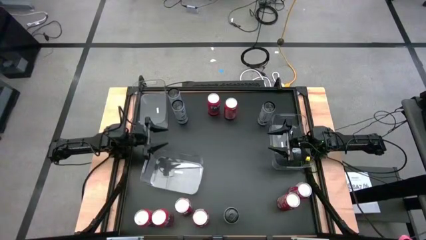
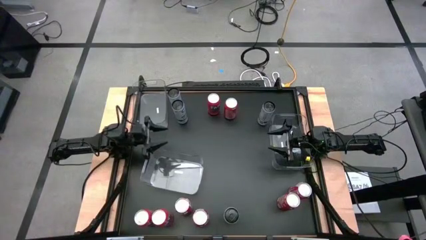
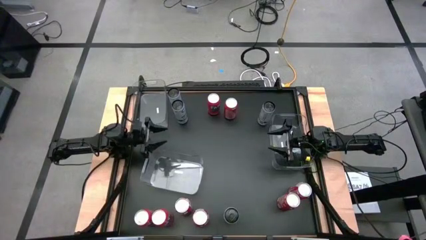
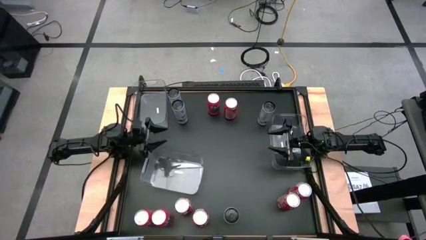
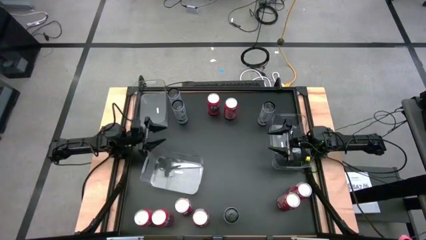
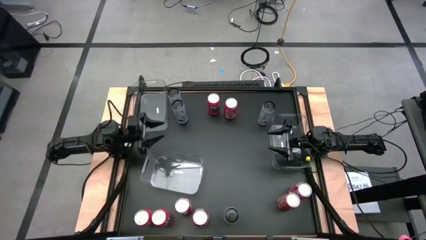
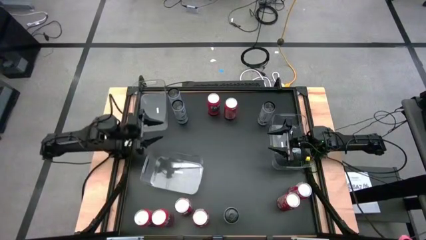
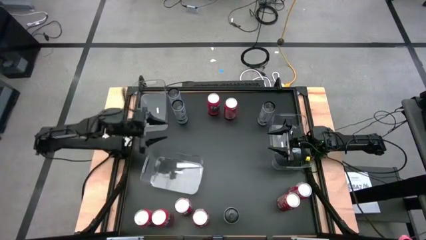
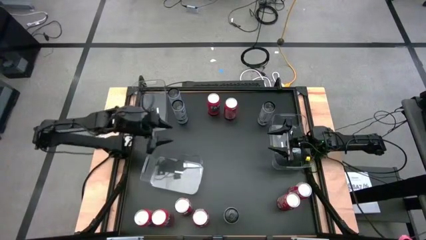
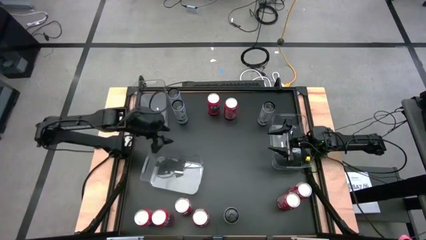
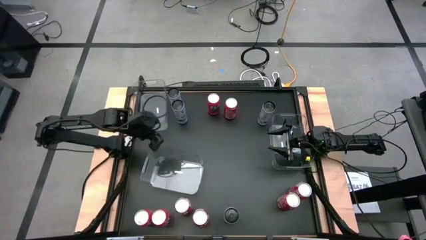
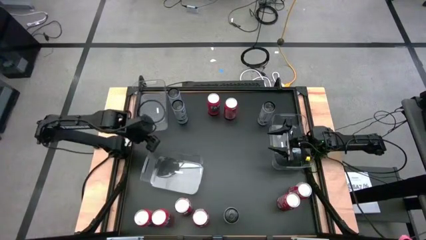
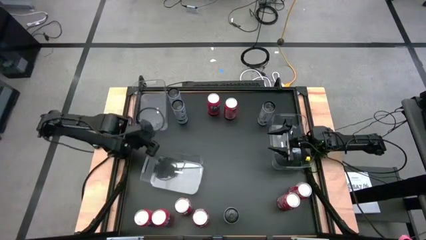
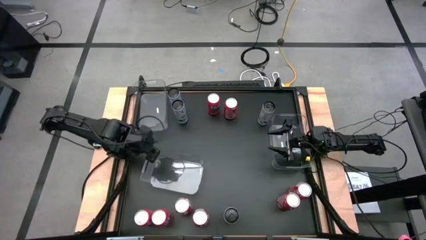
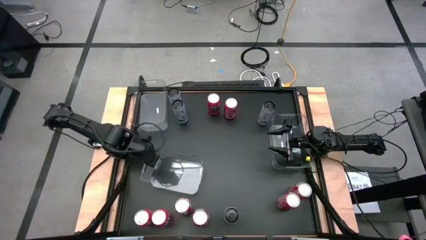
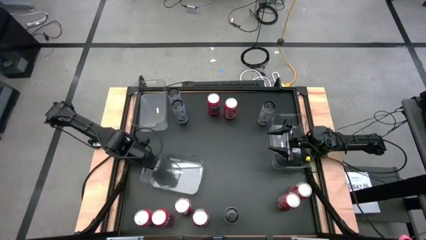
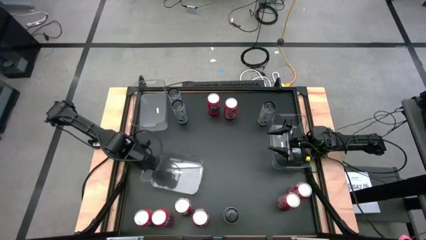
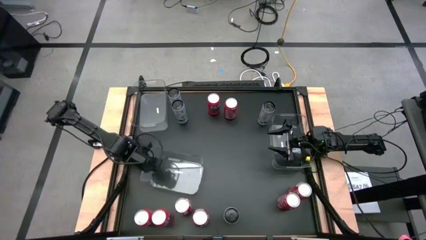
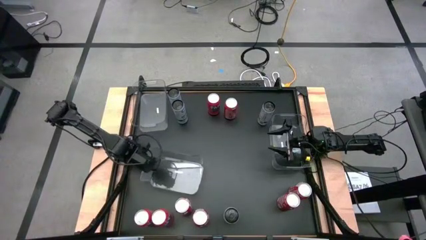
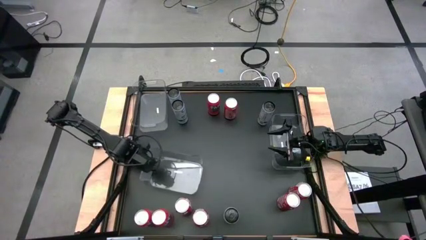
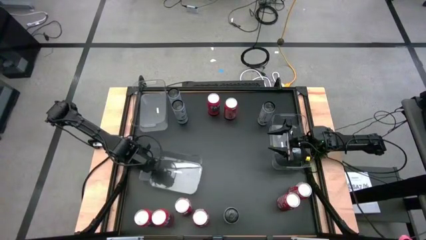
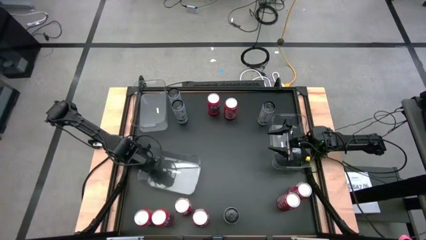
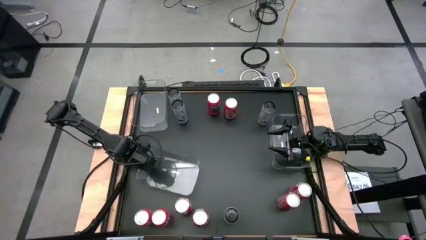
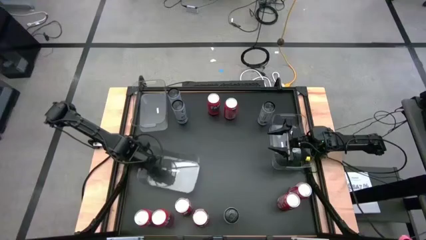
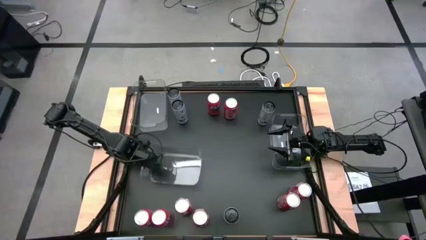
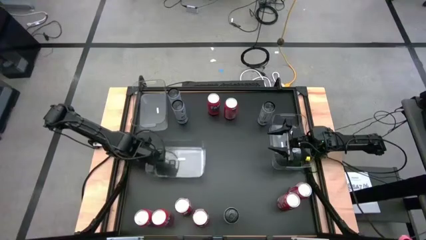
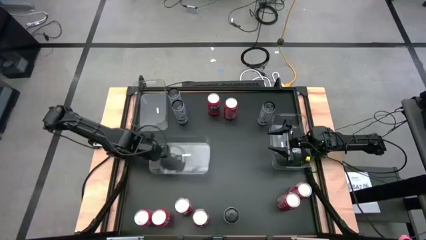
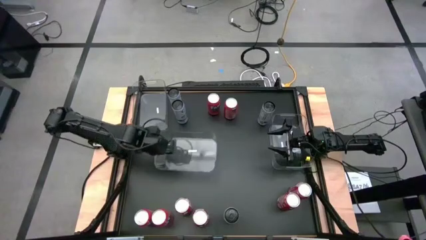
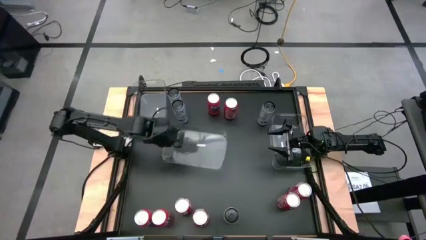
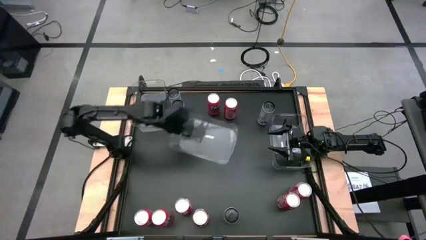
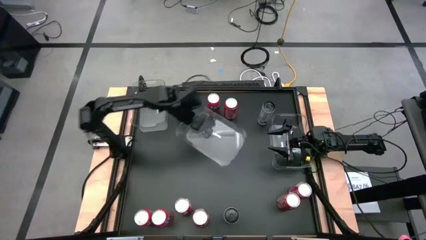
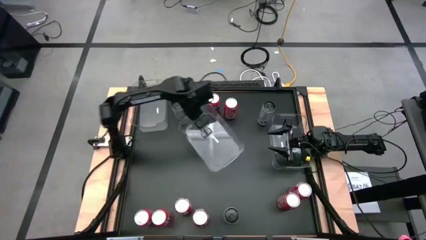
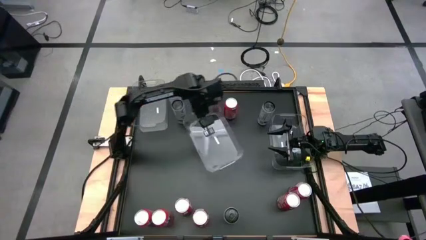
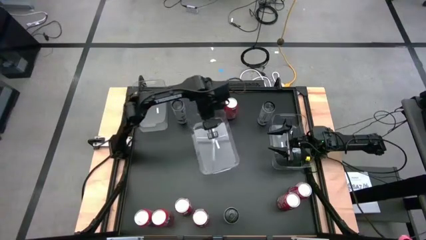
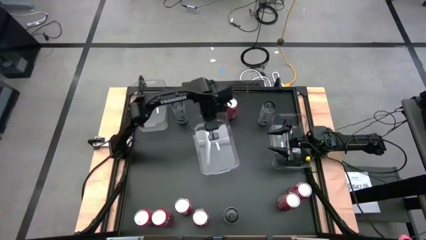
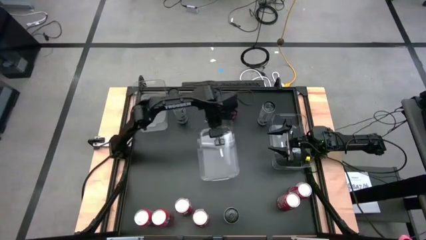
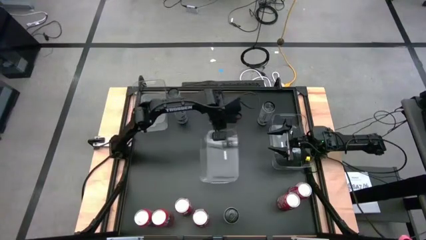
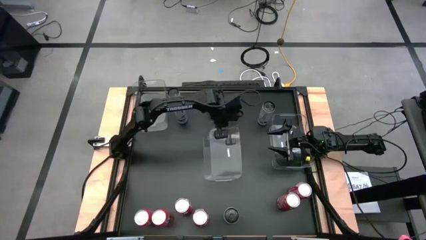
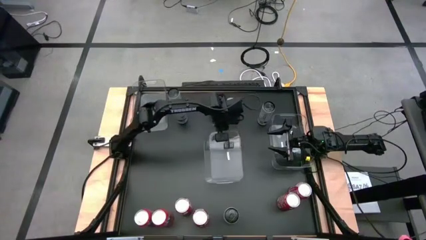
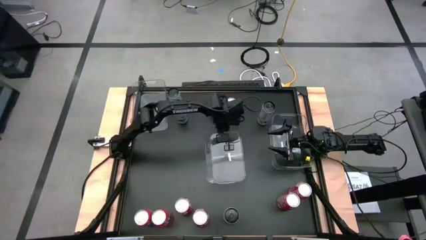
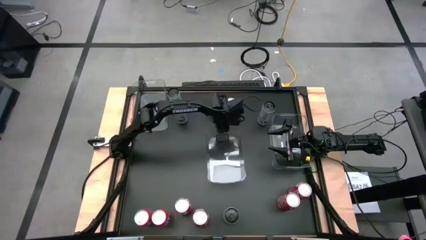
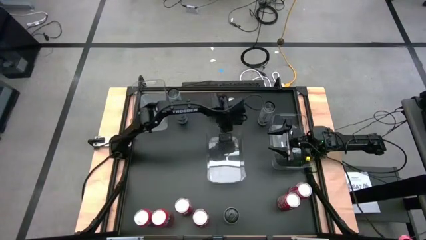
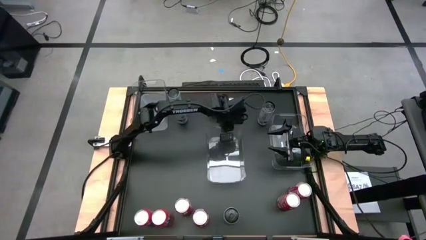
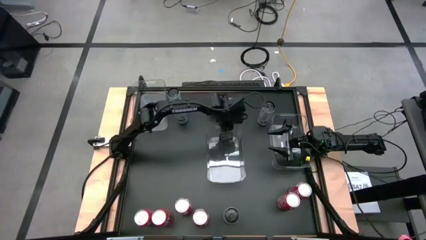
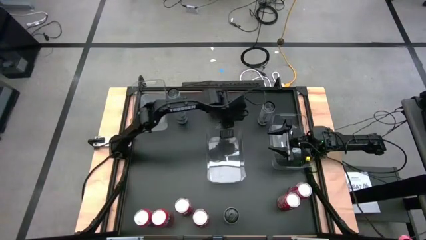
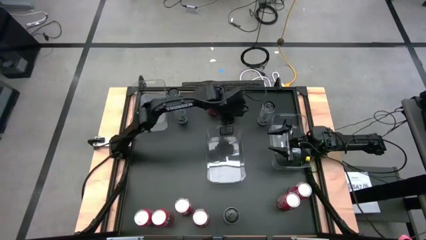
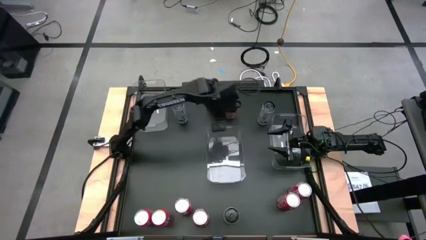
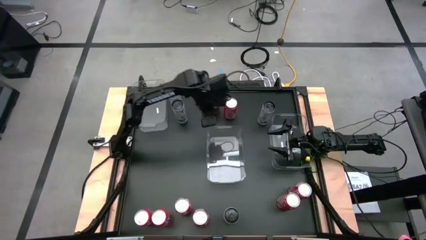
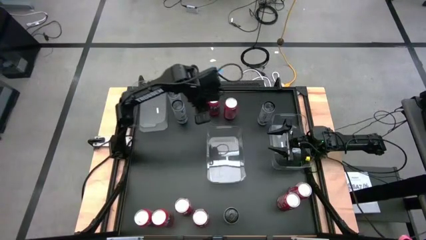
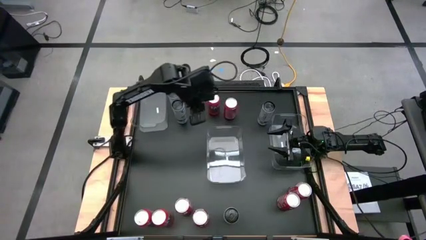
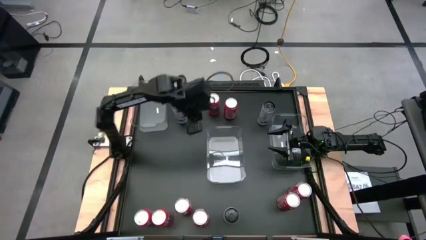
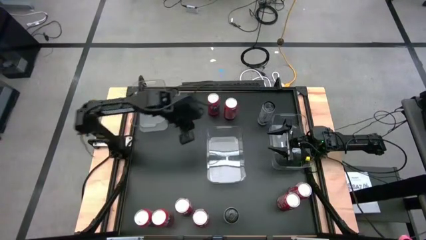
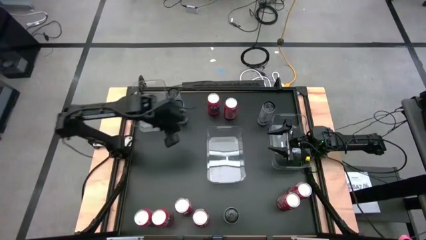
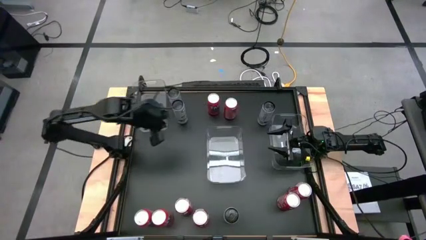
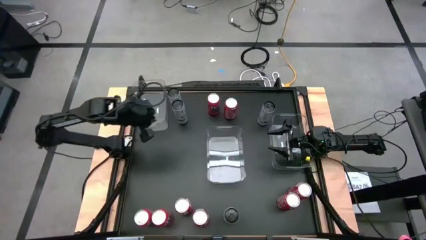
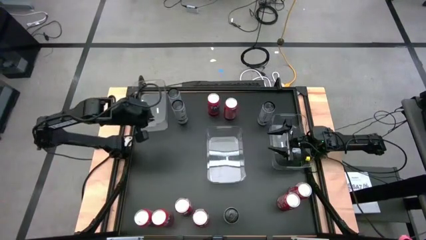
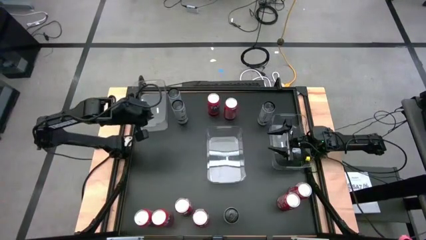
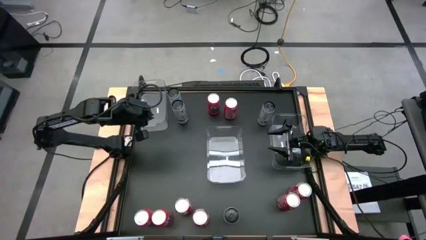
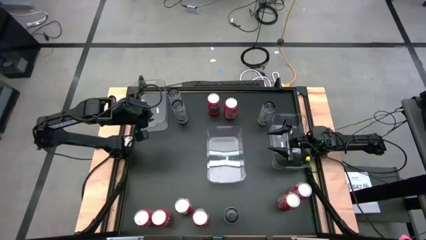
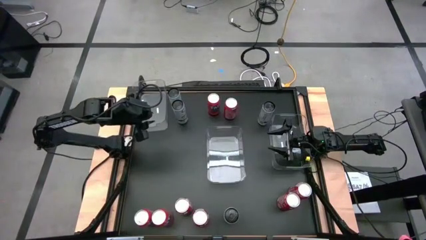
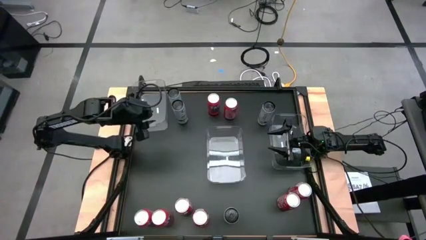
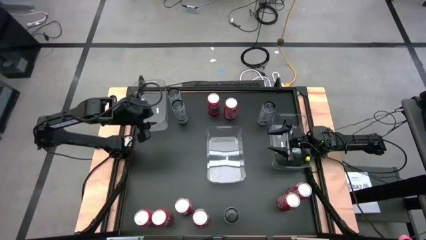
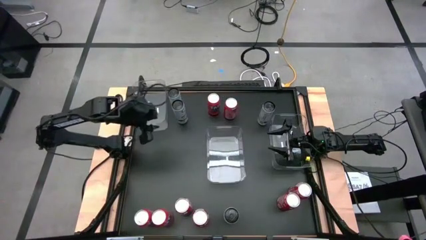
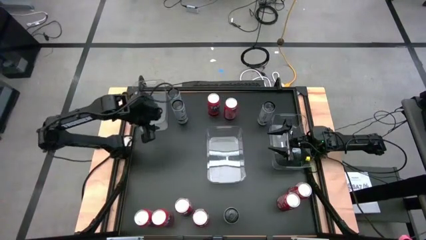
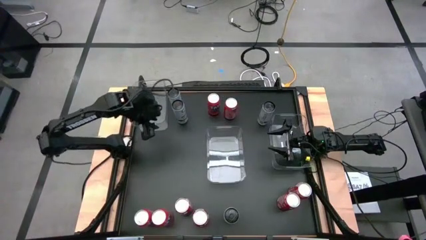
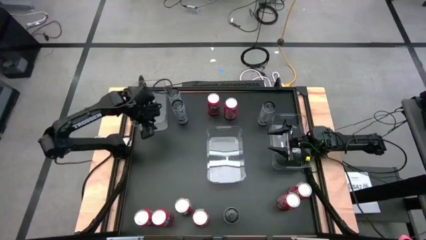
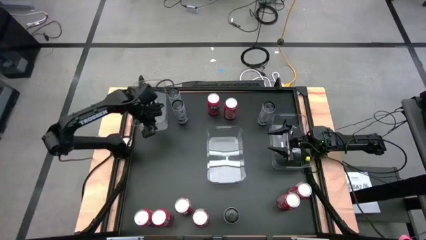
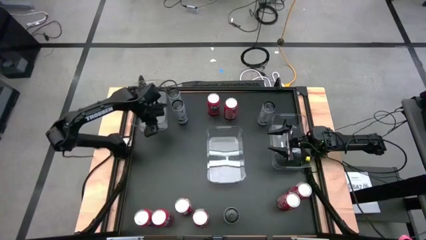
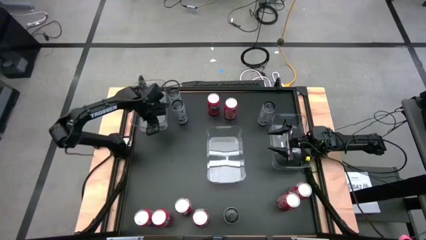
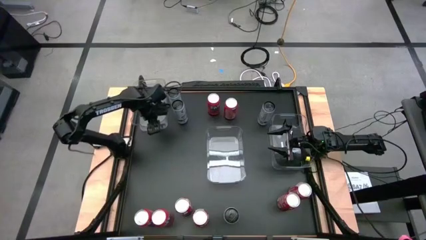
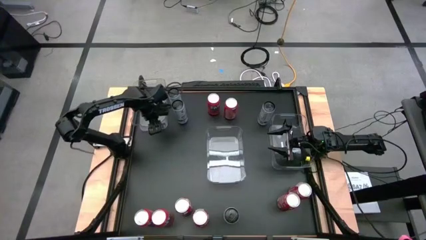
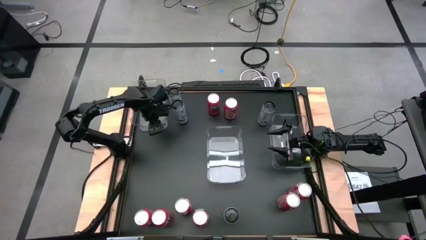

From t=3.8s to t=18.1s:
Task: Sort soda cans
Move the transparent bins to the center of the table
